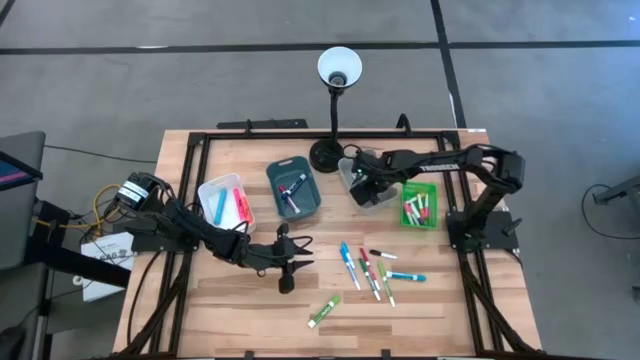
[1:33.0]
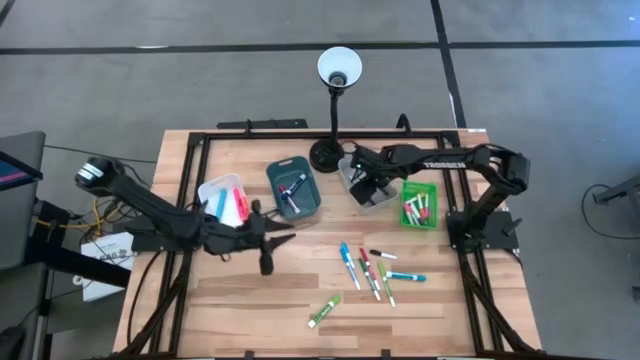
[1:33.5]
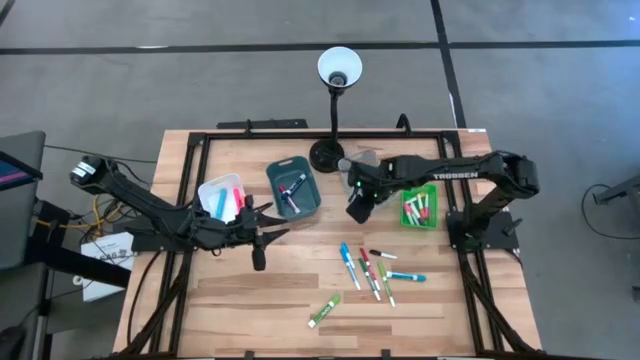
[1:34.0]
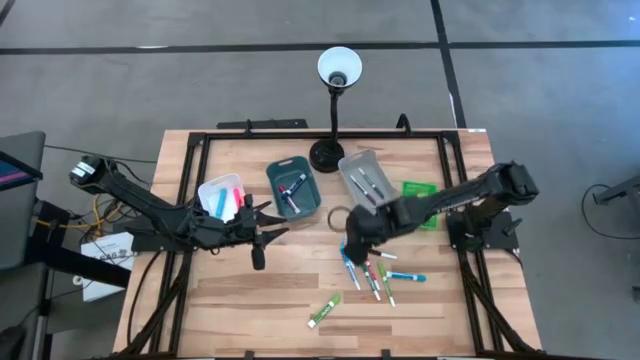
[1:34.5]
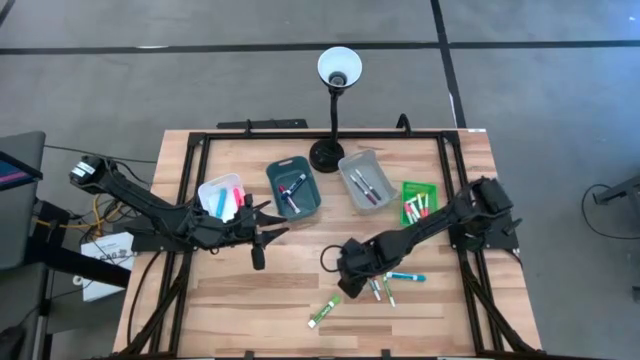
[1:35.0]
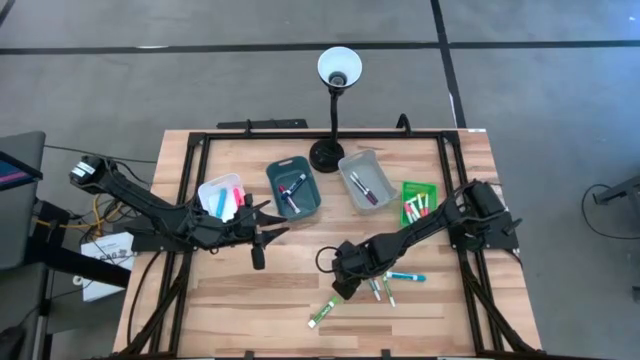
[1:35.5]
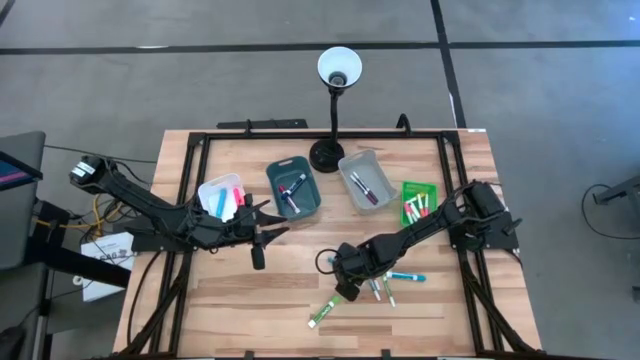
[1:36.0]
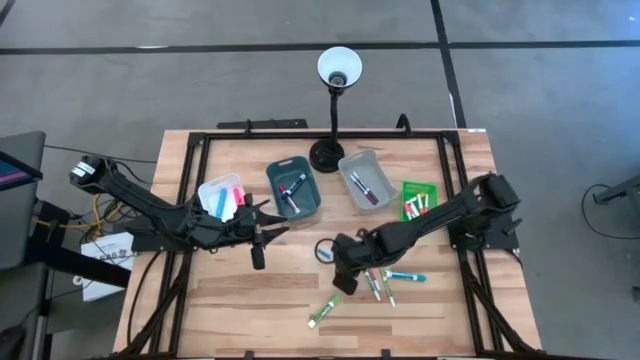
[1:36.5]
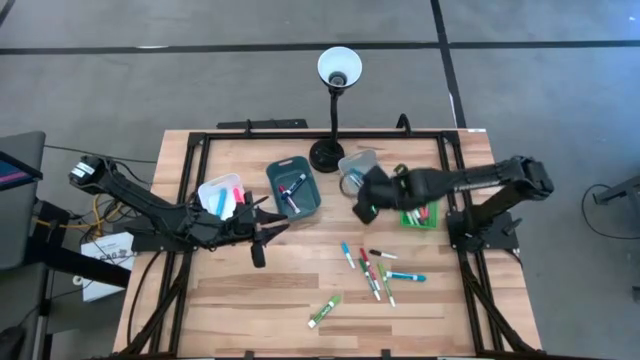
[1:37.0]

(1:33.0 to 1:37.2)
Task: Pick & Place Markers
Put the light blue small marker pen into the gray bin

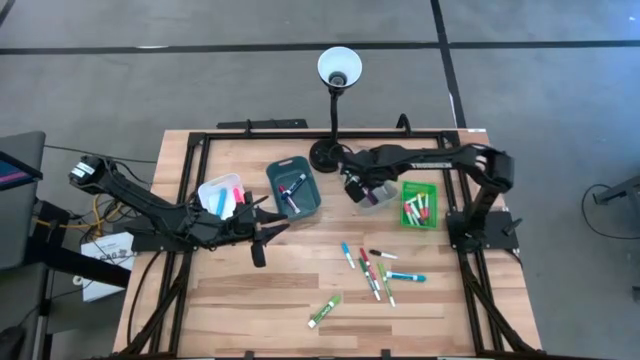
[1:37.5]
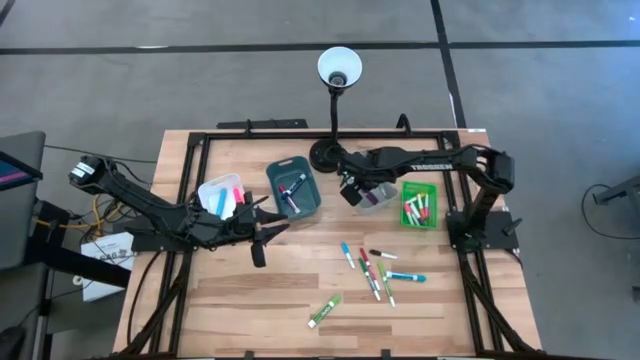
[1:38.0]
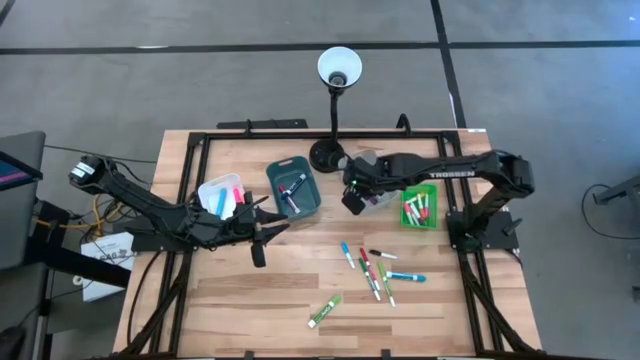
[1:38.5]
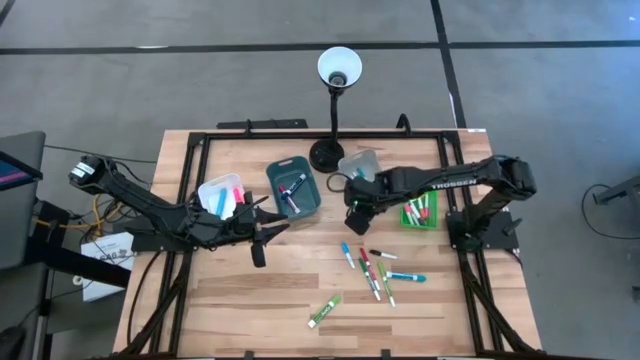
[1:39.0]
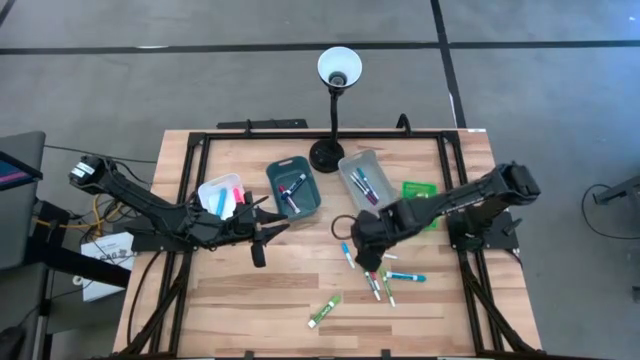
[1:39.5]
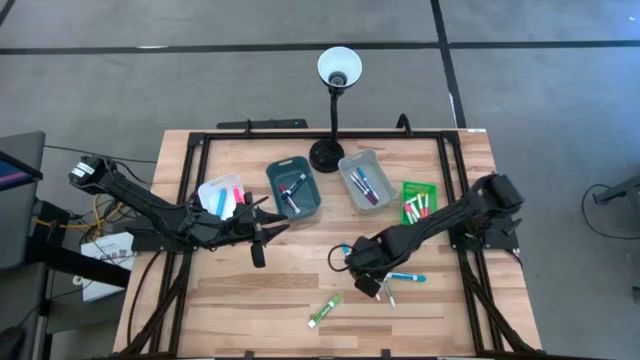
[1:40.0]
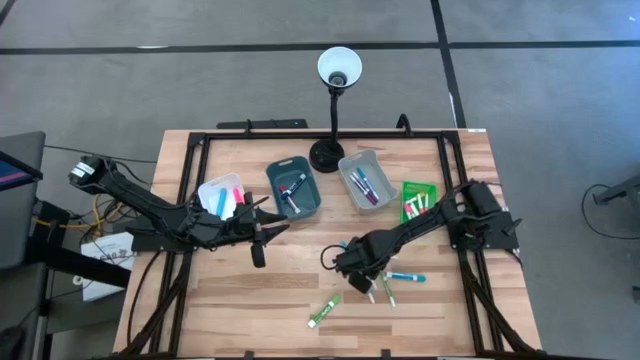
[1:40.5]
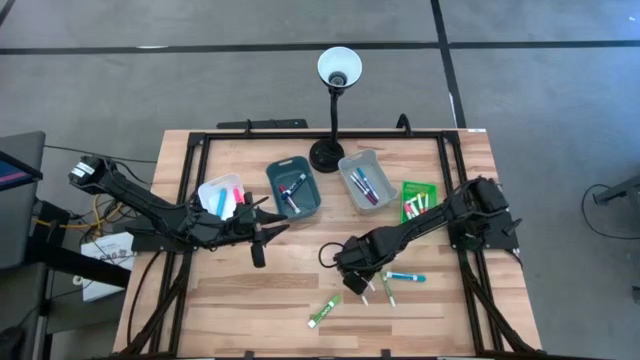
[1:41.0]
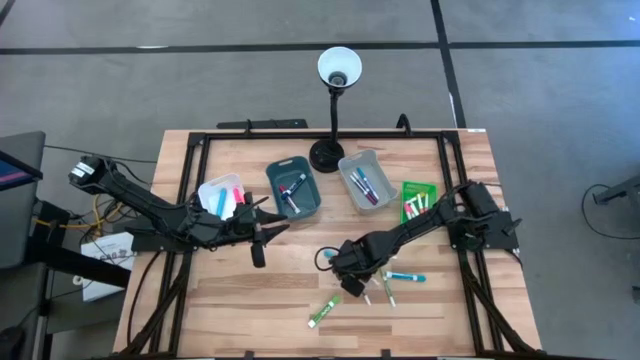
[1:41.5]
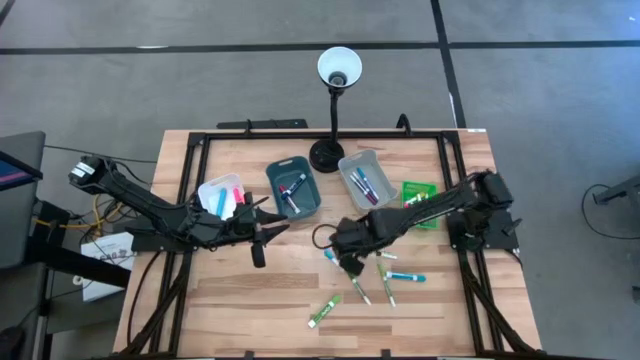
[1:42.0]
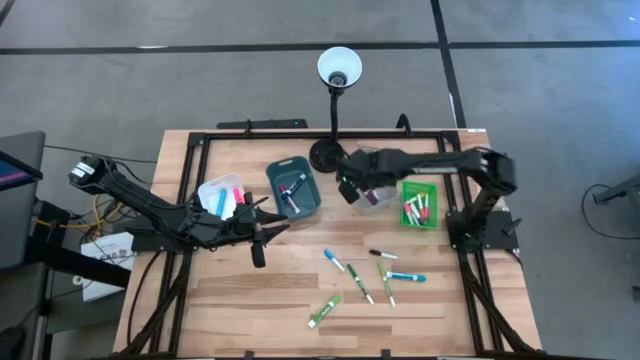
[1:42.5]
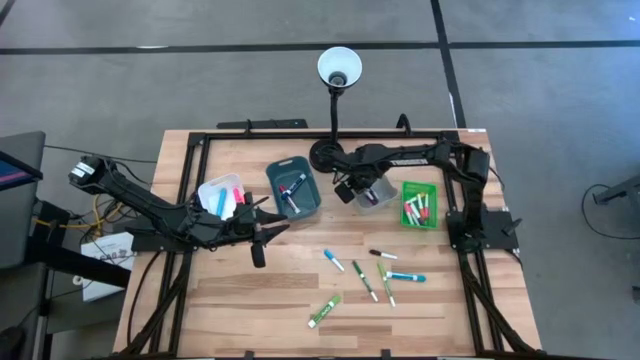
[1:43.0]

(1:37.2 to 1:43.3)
Put the red small marker pen into the gray bin

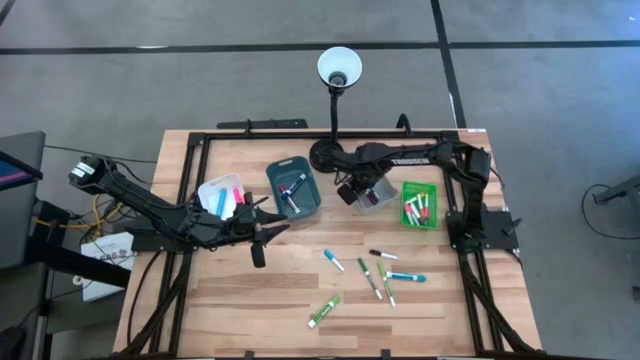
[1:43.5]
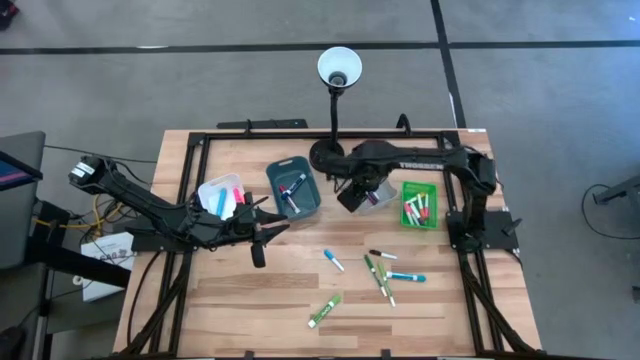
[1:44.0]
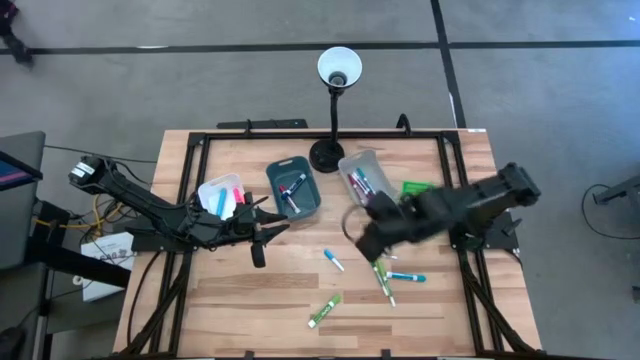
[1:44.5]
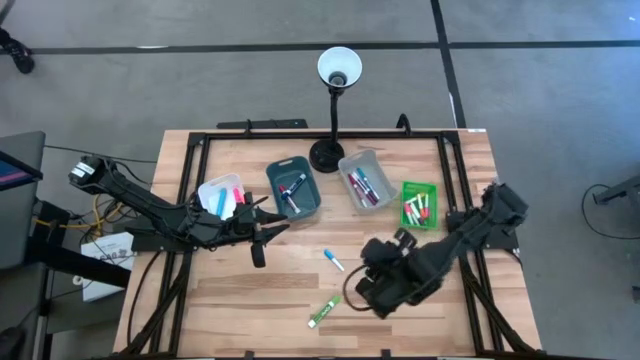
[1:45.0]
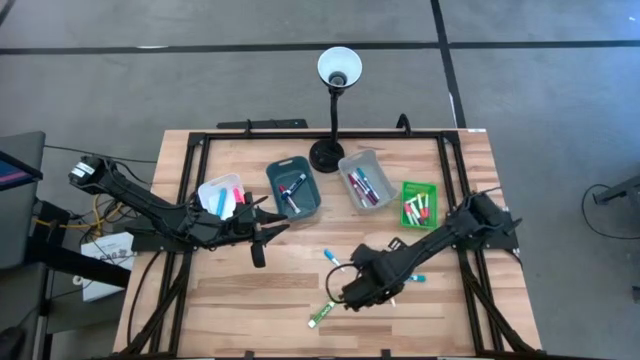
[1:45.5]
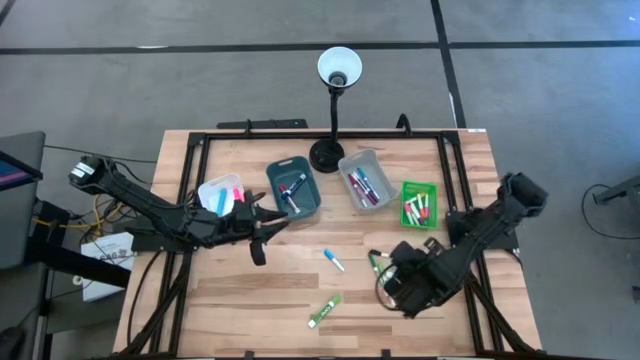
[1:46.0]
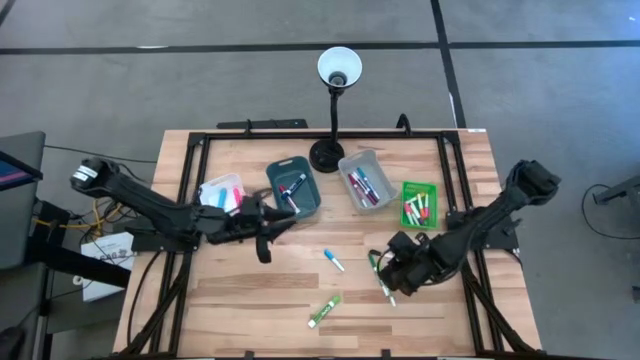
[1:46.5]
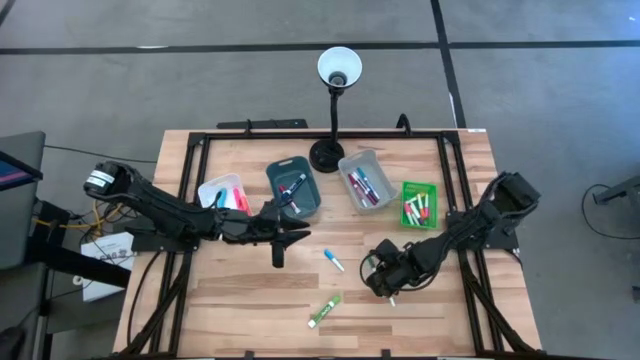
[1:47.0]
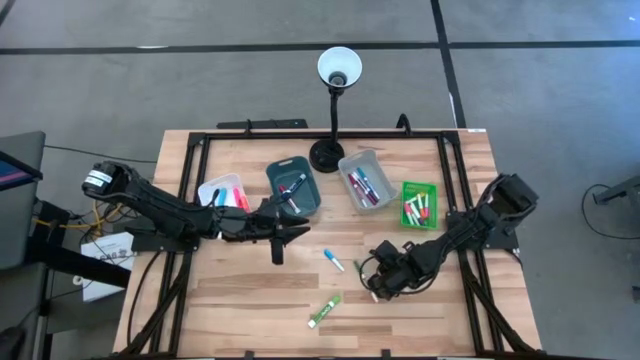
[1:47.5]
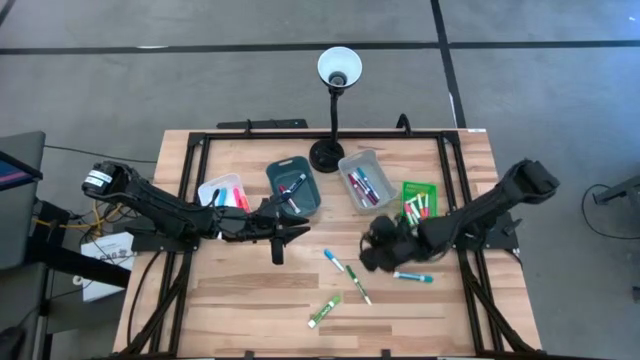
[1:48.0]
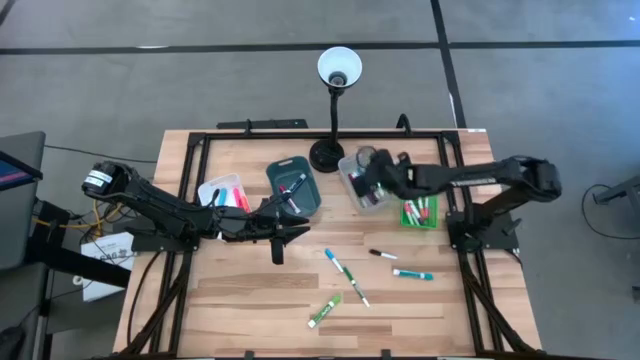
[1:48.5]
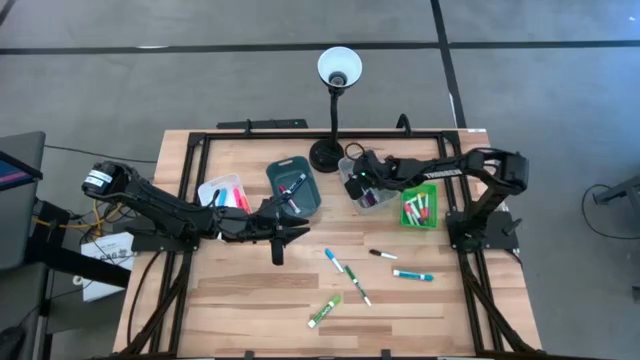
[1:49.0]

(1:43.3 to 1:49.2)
Put the light green small marker pen into the gray bin

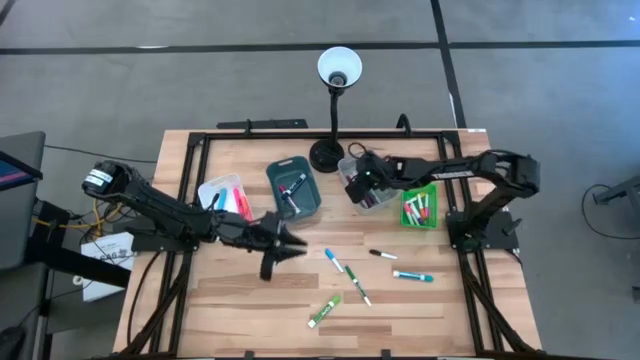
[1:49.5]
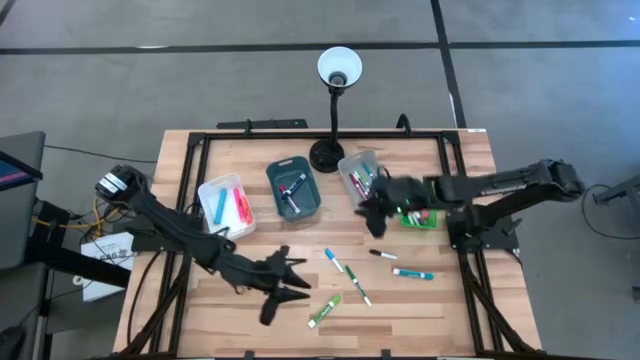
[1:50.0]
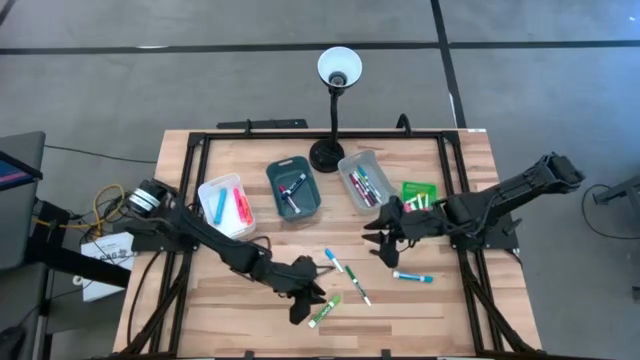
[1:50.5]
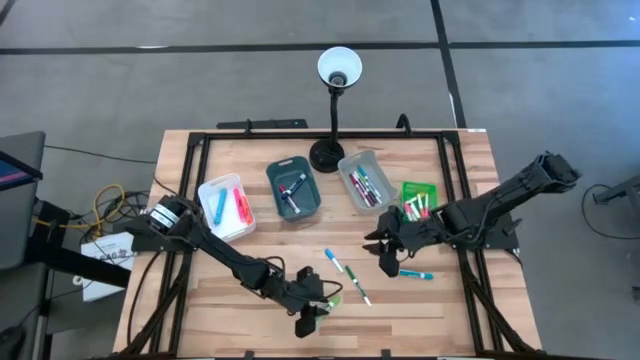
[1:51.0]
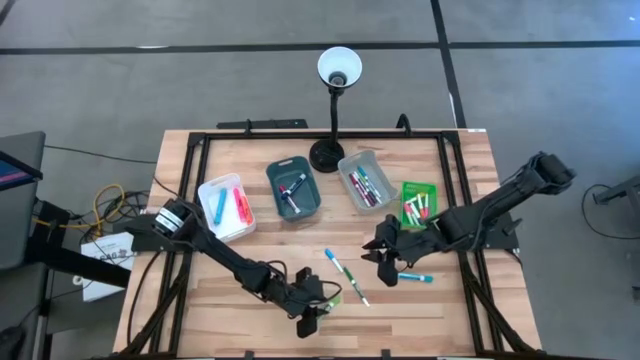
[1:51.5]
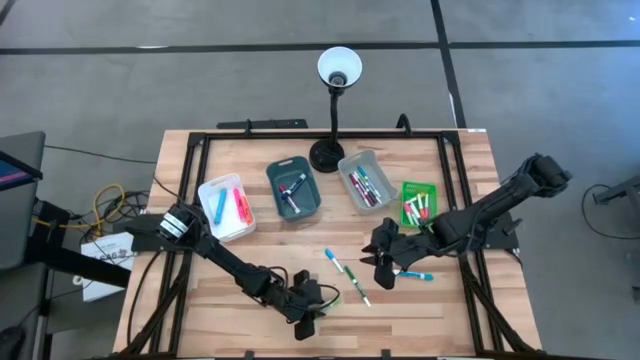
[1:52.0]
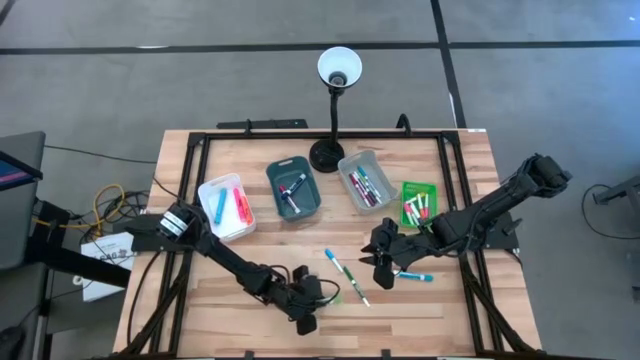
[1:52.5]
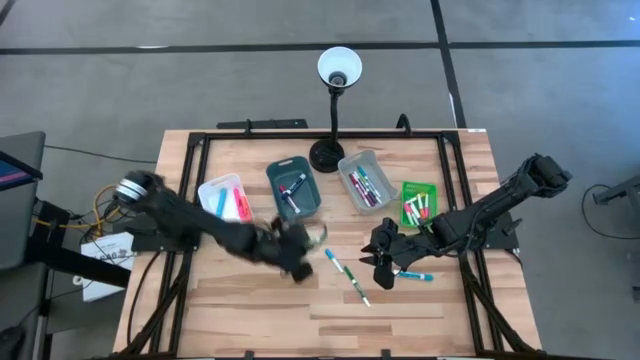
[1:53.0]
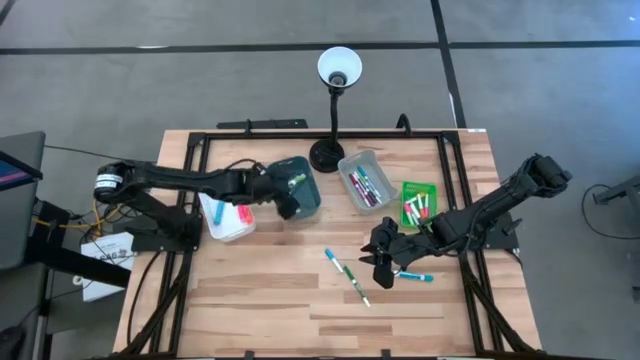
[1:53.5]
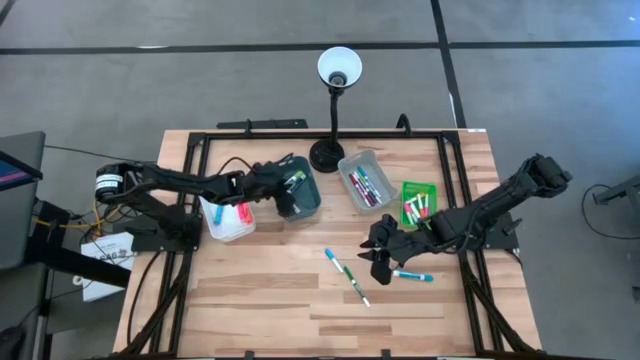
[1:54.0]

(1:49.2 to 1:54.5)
Put the light green big marker pen into the blue bin
